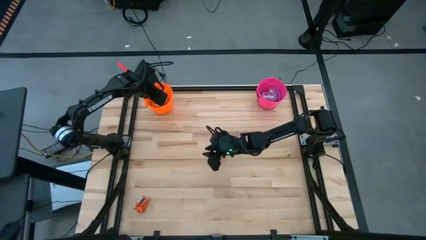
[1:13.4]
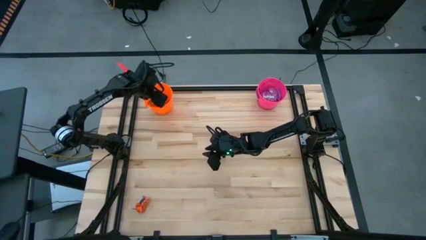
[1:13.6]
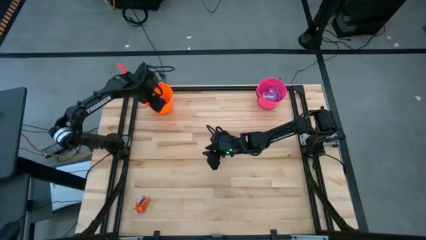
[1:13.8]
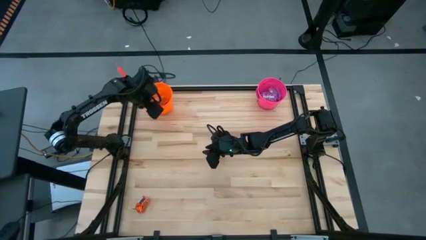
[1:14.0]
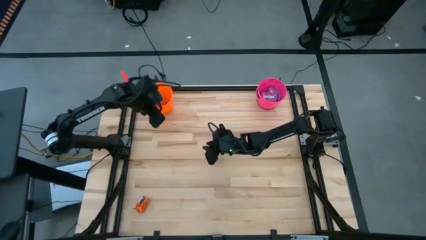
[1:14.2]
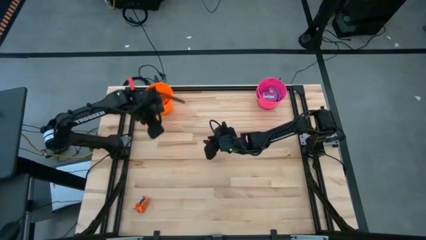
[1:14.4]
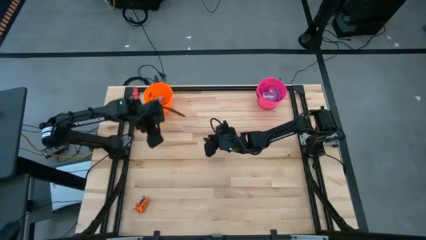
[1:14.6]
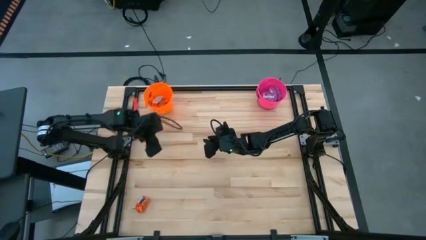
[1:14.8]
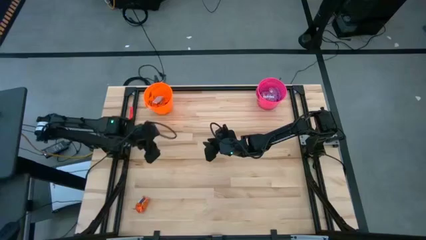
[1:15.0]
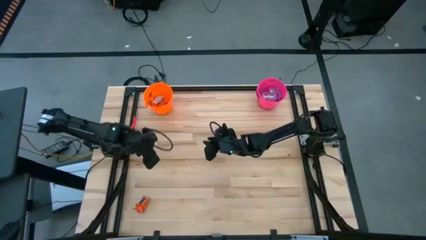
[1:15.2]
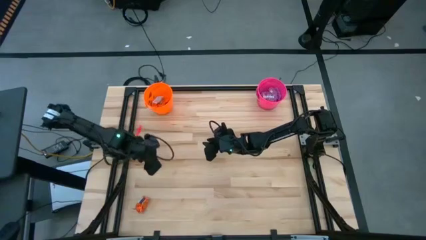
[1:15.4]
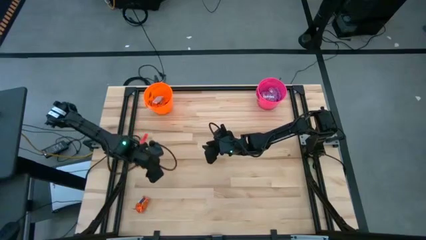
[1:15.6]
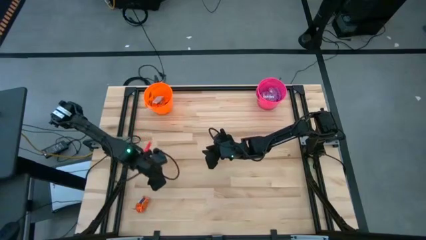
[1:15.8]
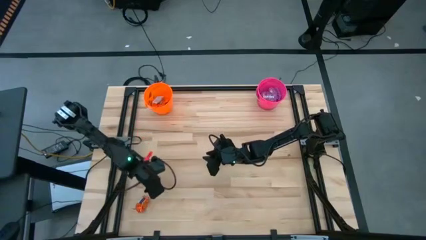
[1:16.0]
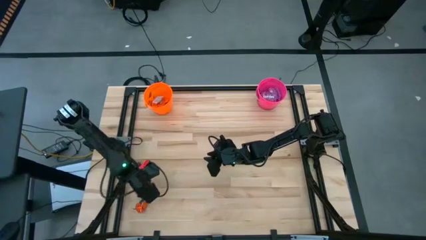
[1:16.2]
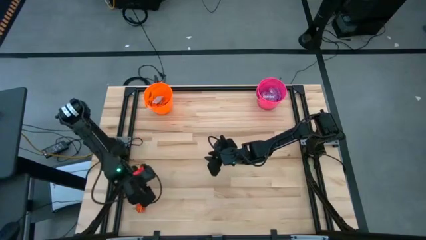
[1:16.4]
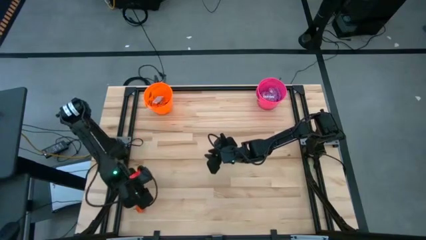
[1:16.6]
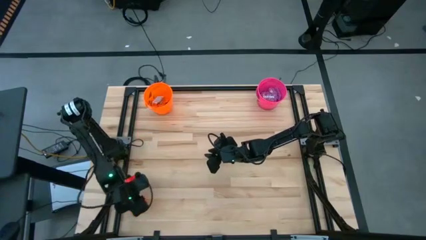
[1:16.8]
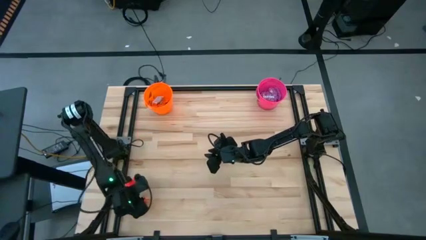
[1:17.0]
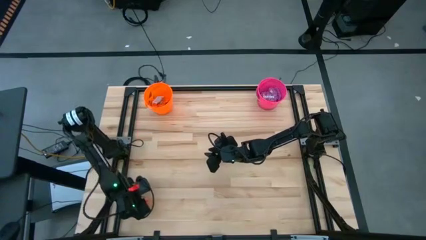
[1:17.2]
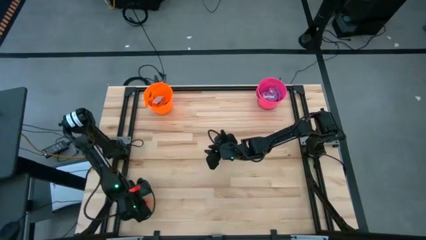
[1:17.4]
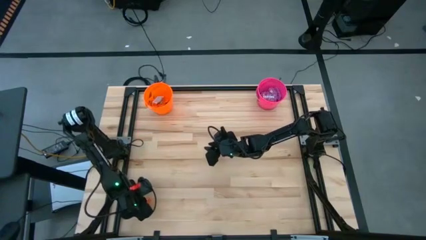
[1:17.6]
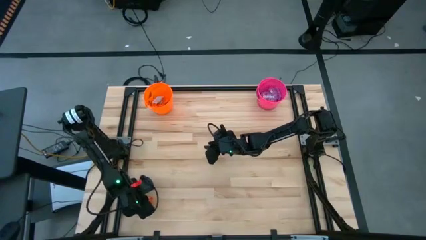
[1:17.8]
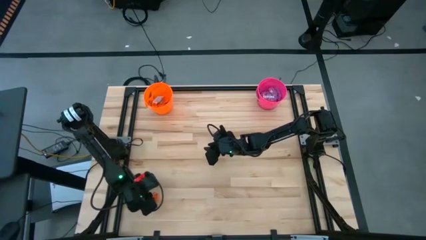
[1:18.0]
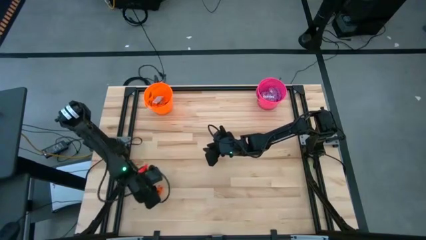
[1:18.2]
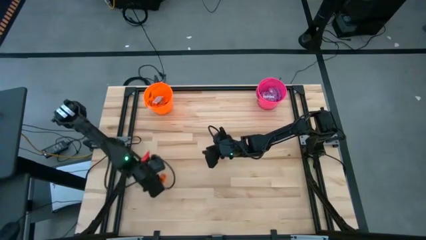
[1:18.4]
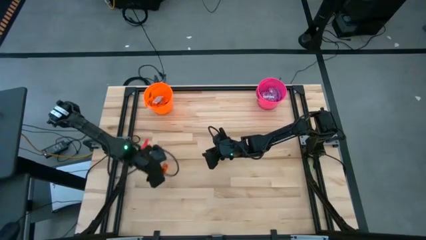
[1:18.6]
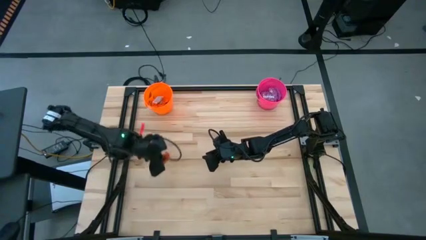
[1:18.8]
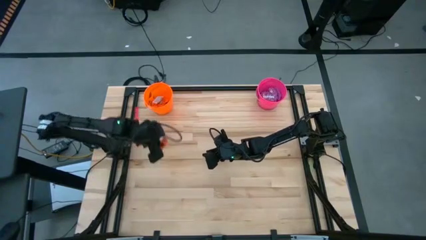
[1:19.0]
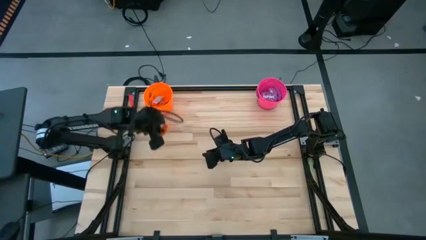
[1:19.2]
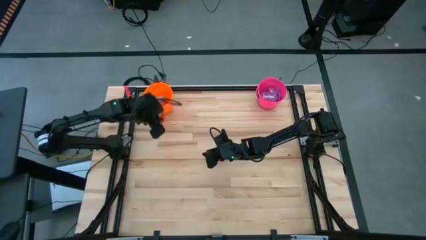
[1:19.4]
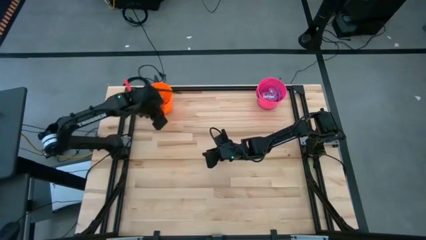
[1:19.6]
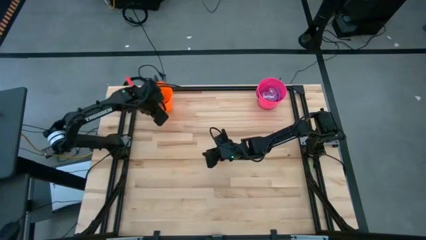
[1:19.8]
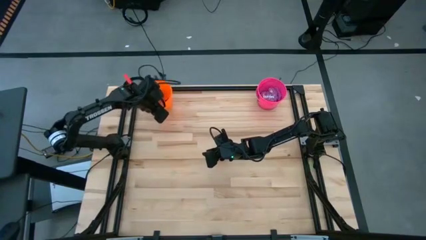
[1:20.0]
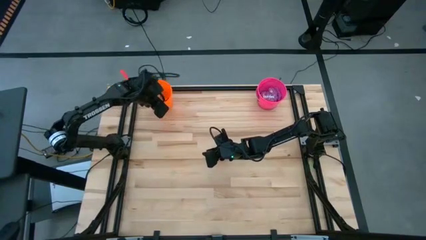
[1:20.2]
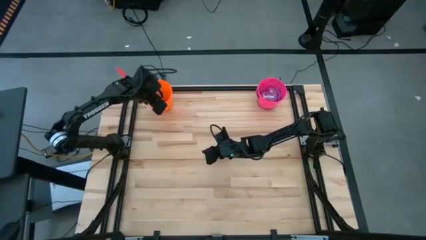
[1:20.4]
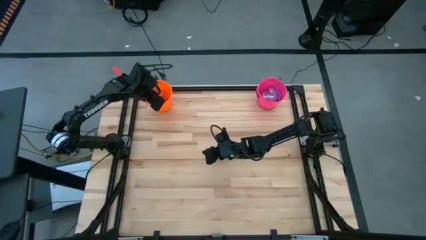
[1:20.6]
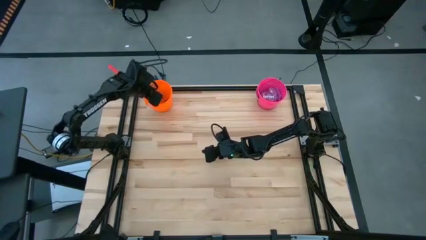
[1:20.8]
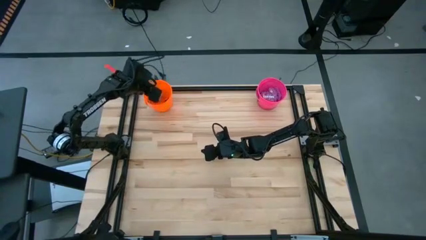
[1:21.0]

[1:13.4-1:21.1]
Task: Sort candy by brand, put in halloween buckets
Put the orange chocolate bar into the orange bucket

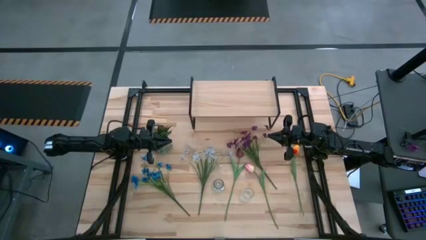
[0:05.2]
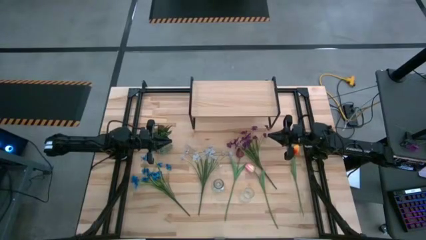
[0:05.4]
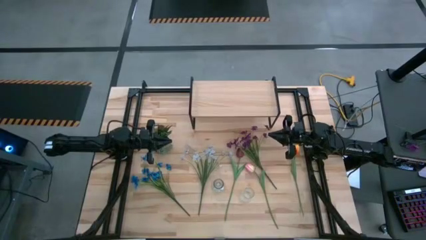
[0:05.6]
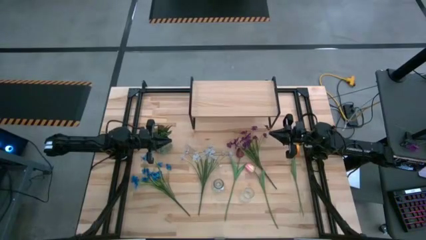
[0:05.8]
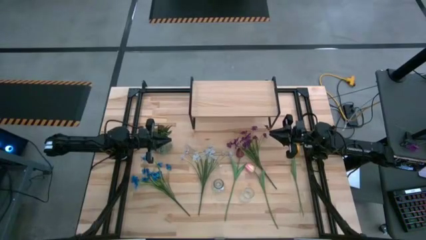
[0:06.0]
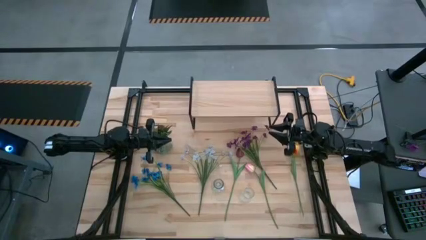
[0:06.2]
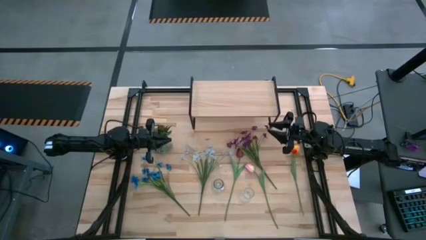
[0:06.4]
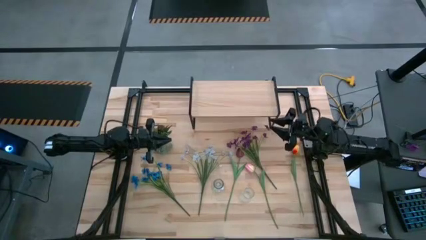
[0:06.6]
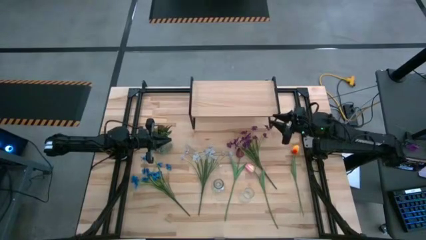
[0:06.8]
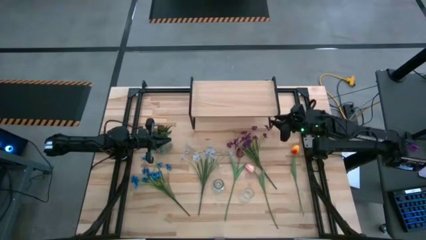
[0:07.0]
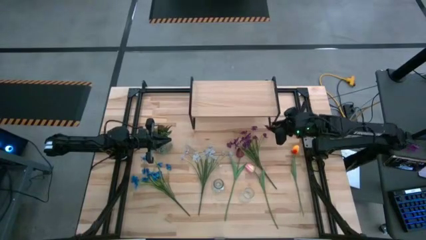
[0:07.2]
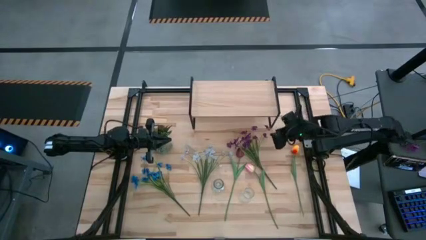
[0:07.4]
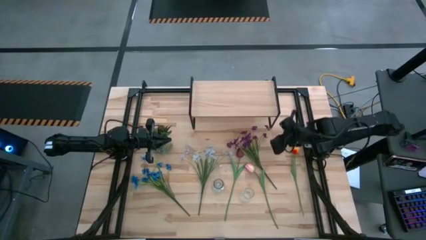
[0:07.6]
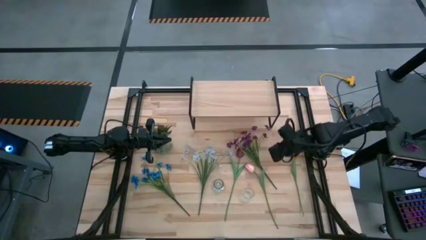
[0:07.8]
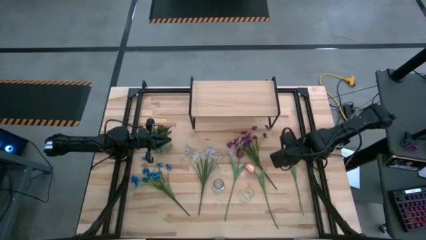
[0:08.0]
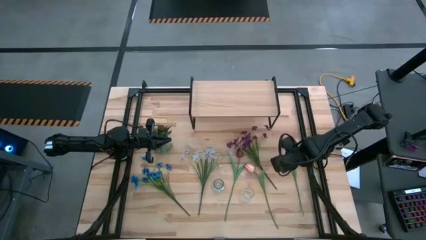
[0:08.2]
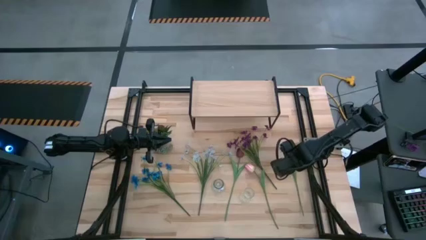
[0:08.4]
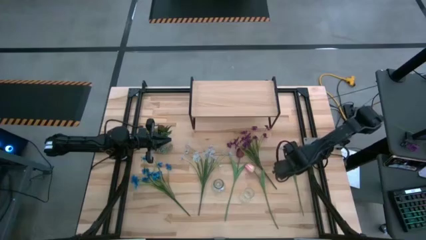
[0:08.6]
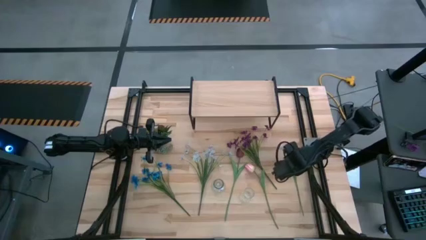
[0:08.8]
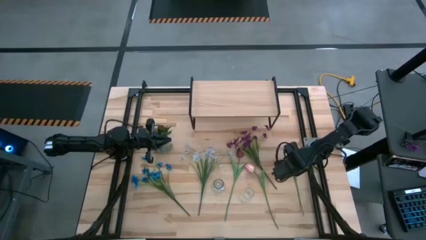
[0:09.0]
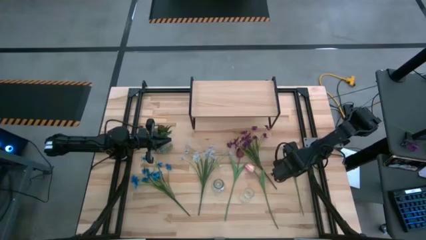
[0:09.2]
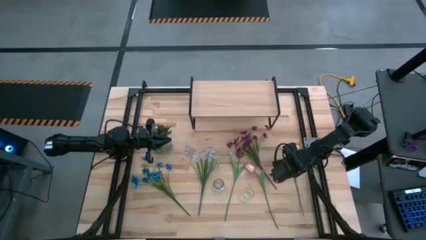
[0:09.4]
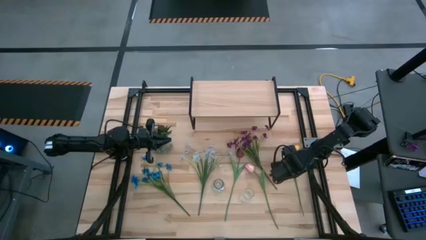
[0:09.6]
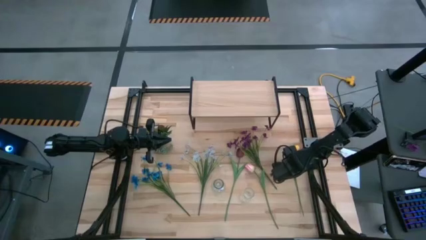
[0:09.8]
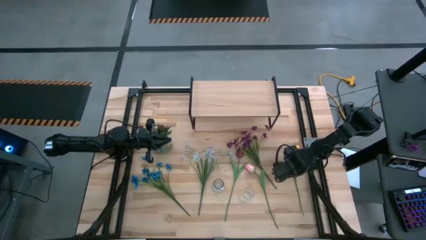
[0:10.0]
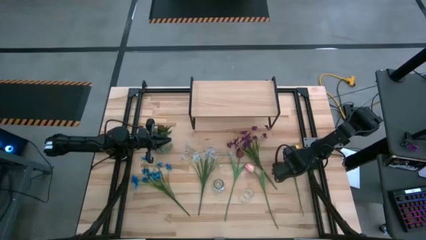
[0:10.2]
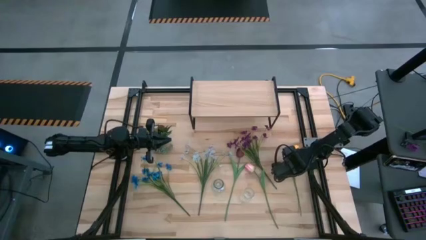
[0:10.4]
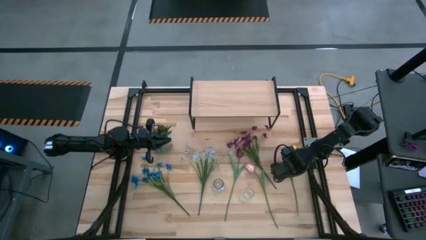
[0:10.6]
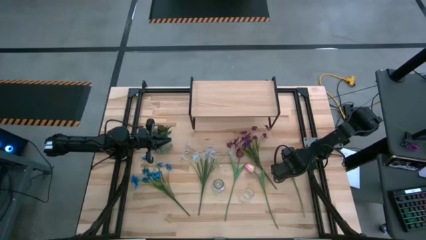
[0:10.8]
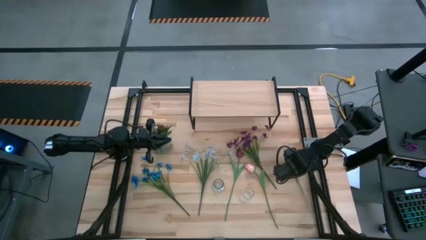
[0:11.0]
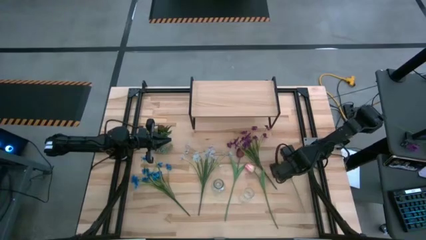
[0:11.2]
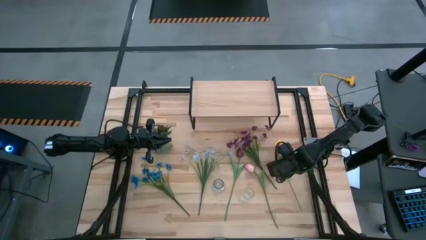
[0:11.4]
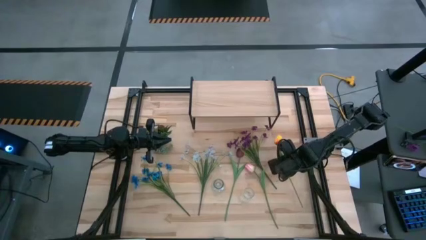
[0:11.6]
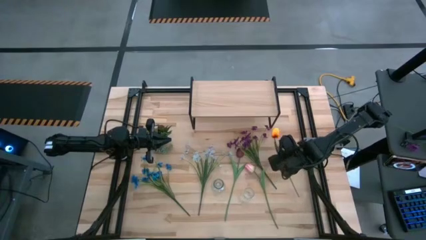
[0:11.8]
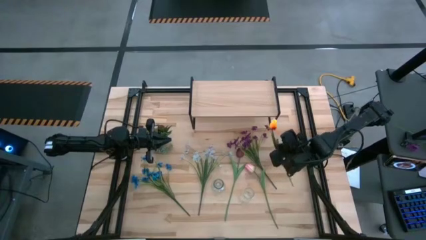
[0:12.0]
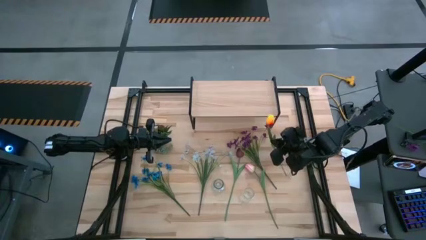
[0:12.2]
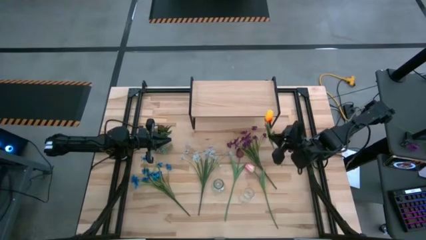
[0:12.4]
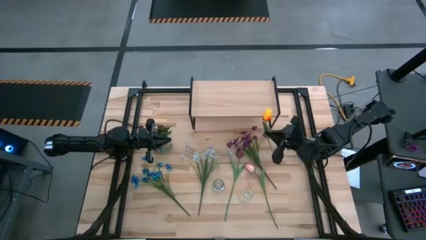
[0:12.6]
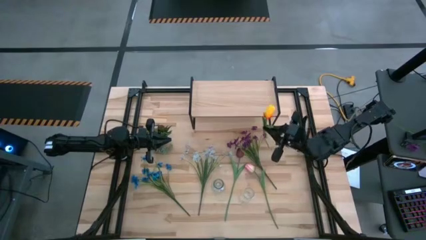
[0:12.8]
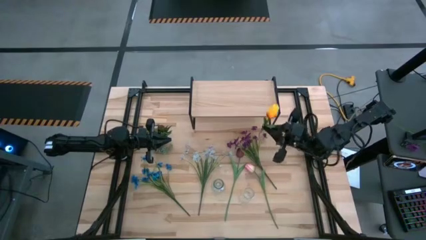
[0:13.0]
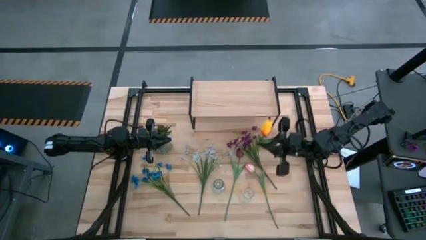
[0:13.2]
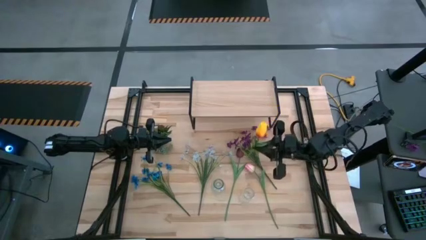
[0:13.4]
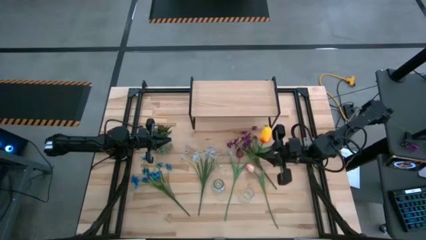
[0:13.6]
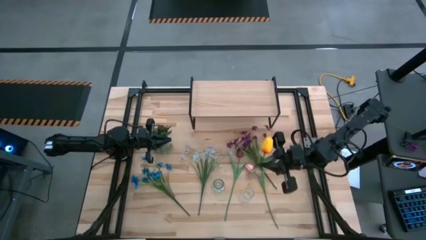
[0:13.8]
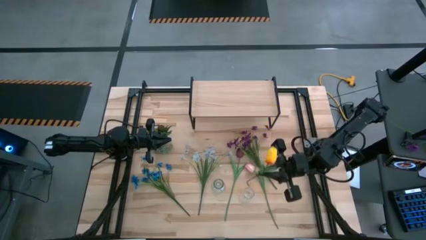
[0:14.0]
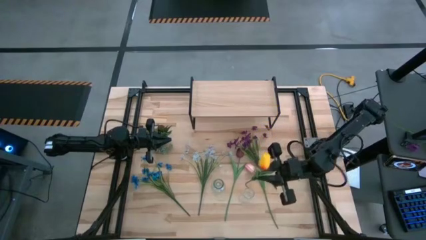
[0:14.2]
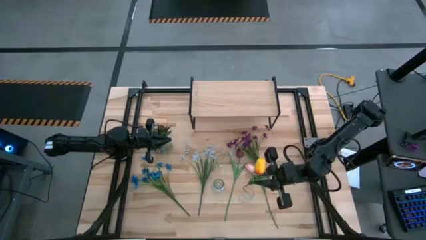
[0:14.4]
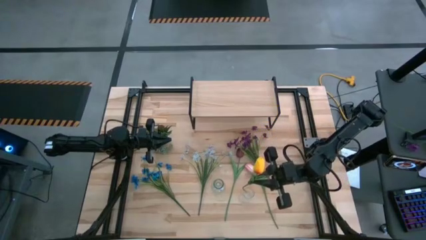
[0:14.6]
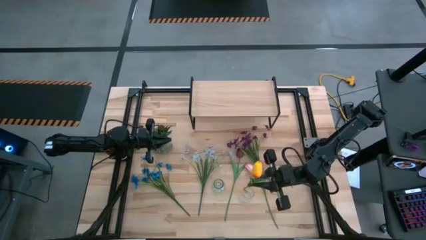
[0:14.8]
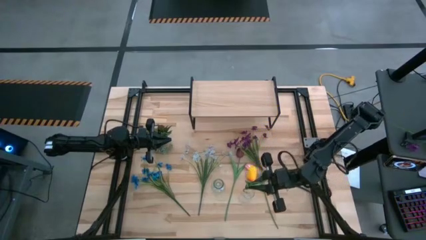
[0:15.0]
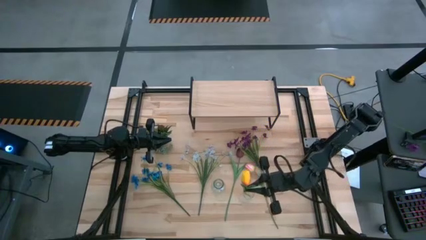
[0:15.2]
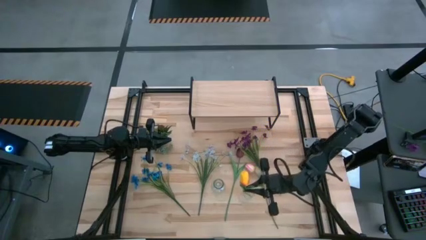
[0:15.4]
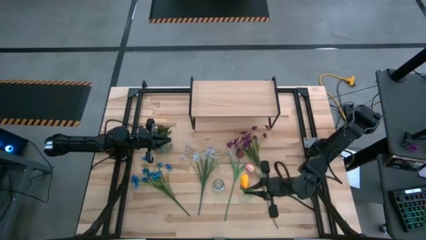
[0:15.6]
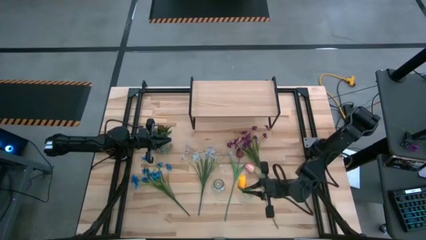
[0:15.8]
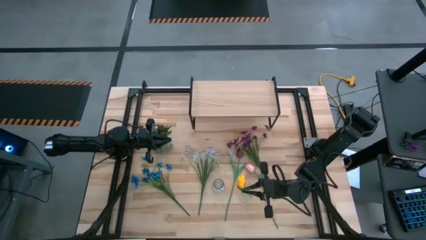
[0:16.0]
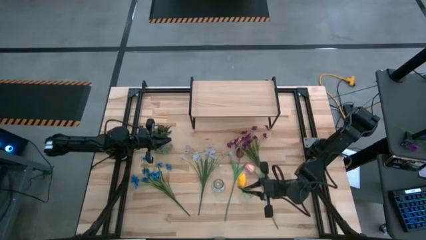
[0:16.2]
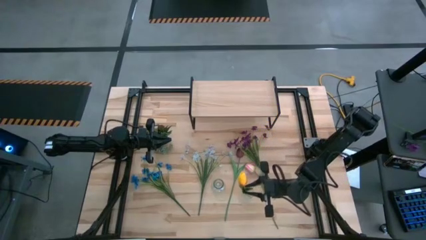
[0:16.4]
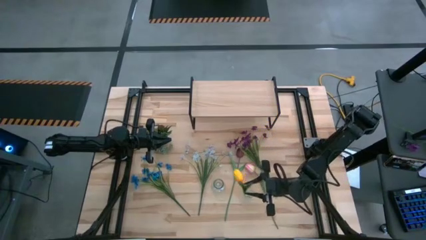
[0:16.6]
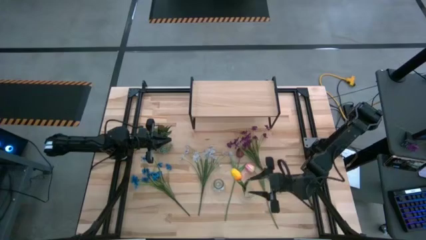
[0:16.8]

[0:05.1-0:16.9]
Task: Pick and place flowers into a vace then onto a shelf
Put the yellow tulip into the right transparent vase
